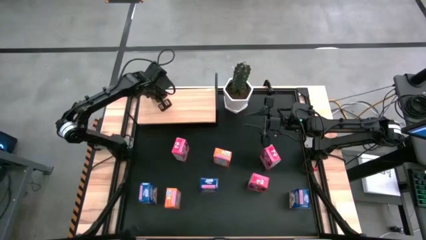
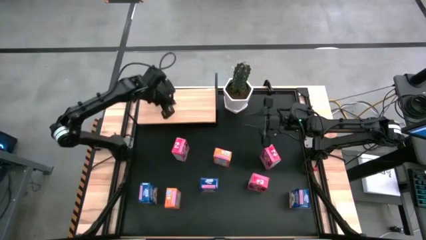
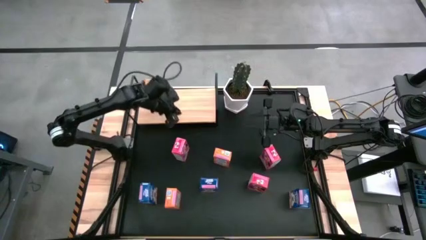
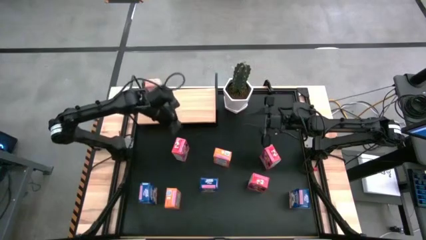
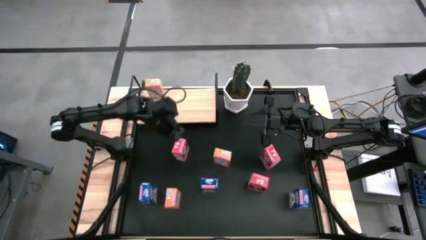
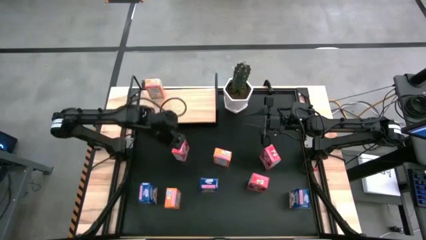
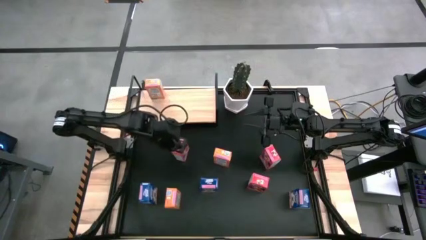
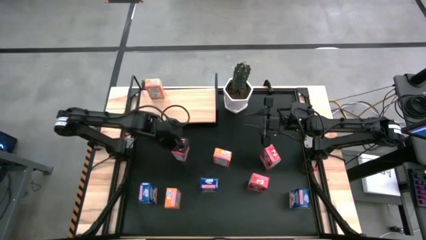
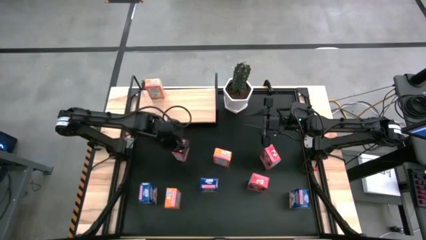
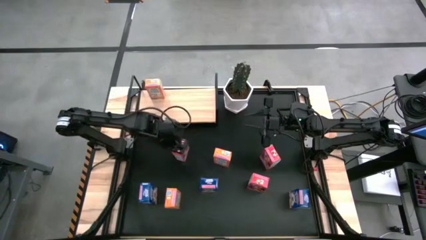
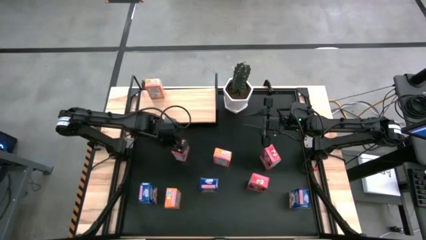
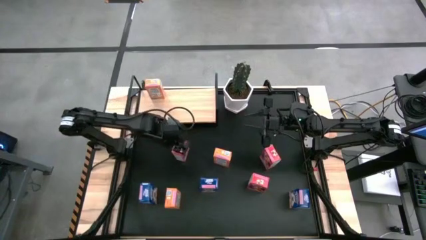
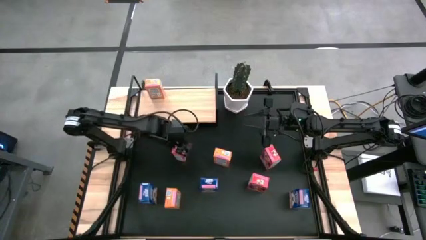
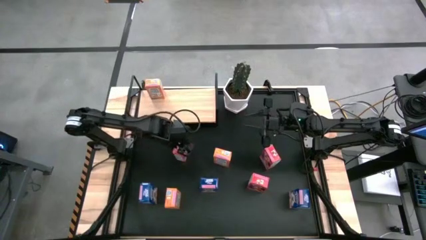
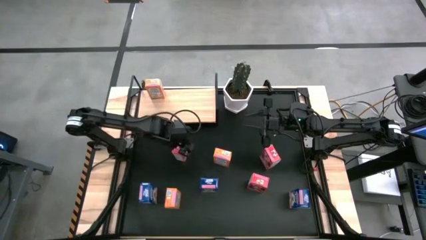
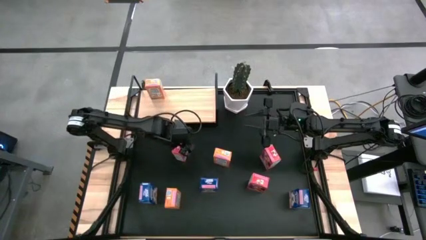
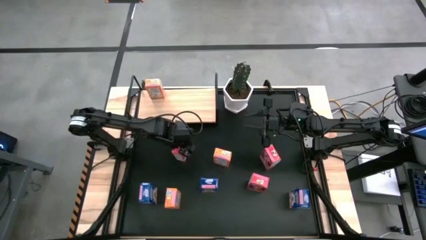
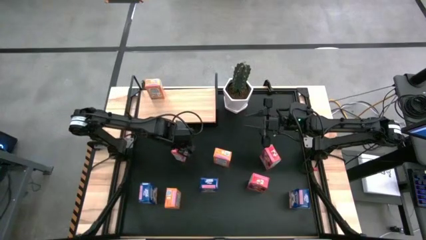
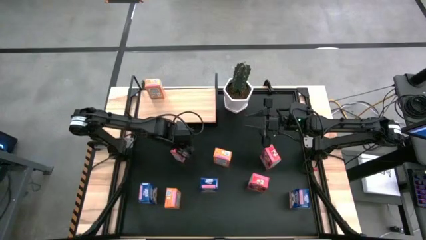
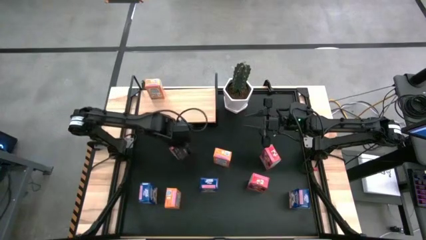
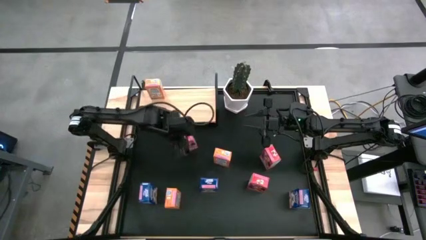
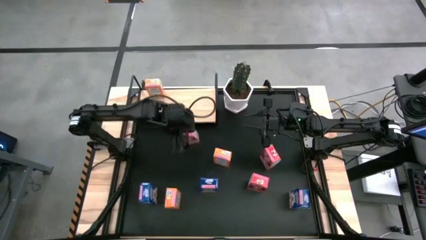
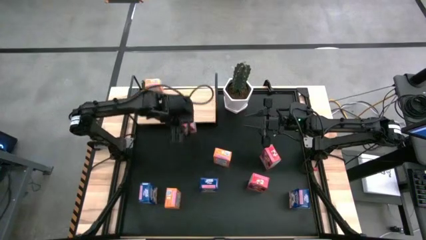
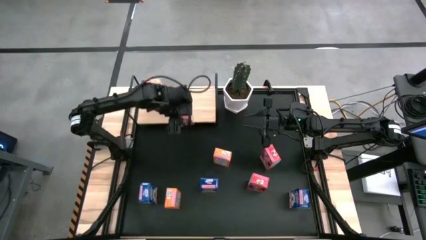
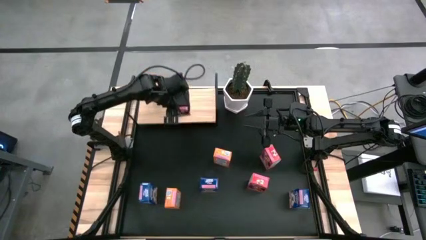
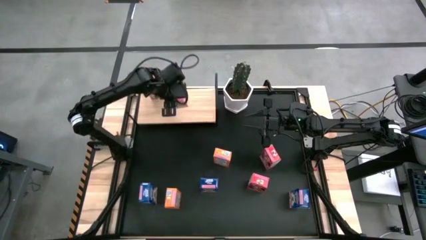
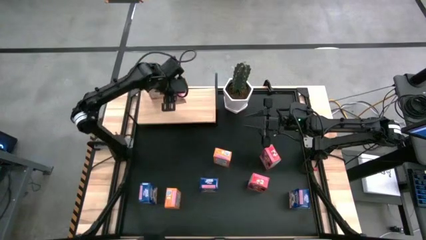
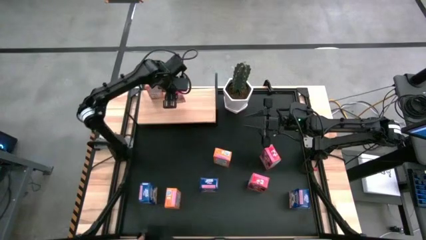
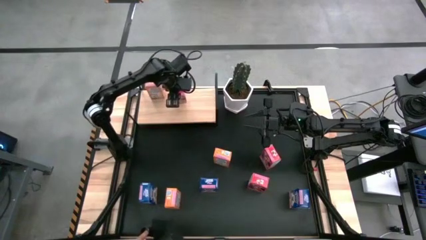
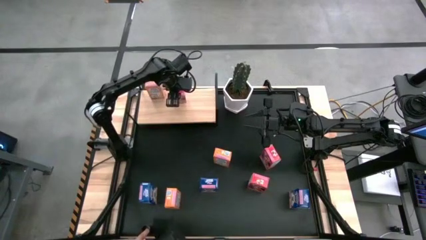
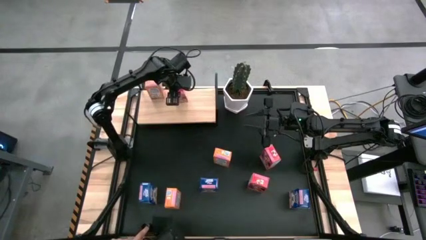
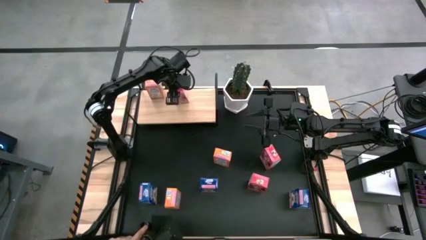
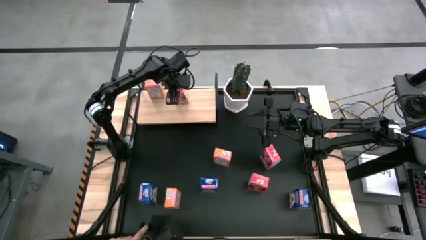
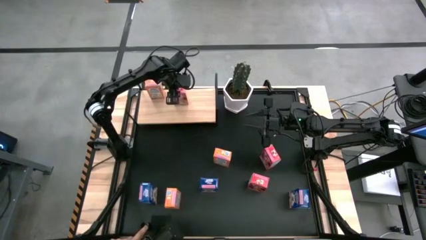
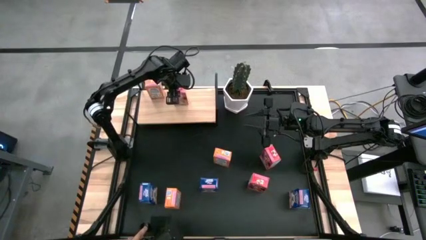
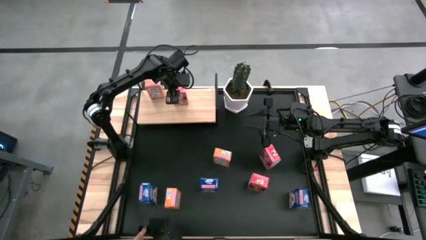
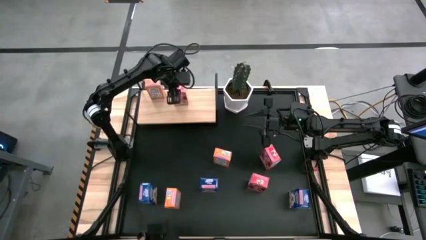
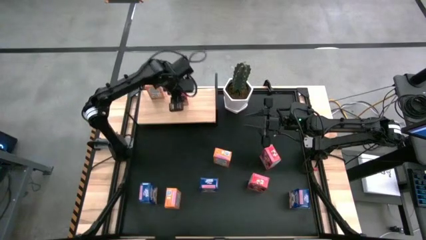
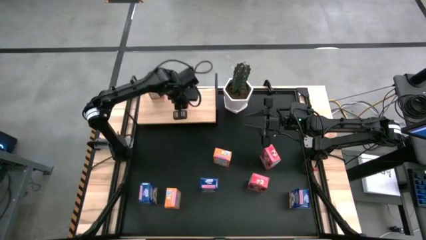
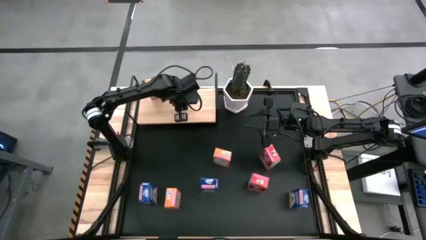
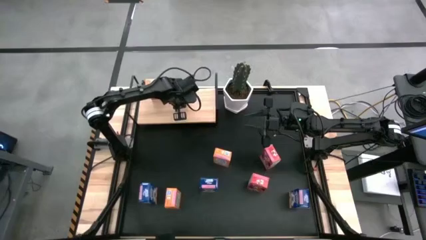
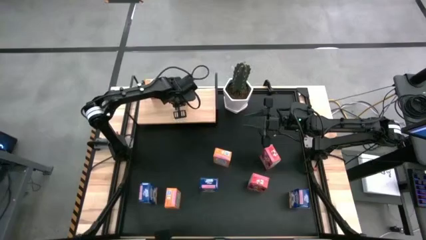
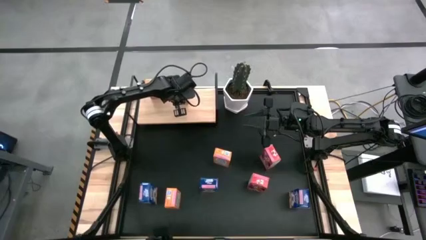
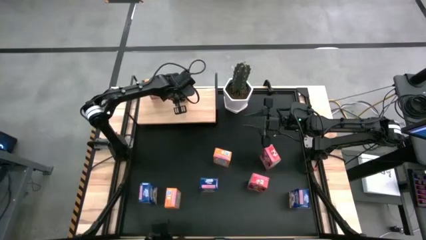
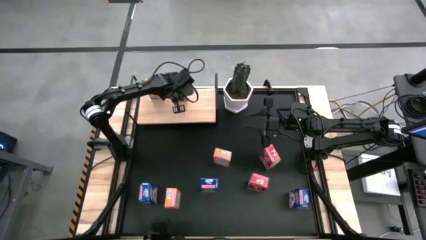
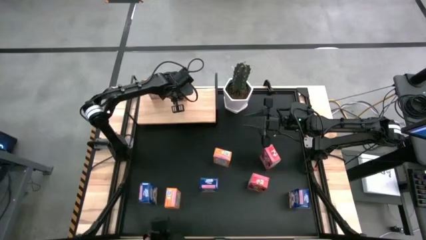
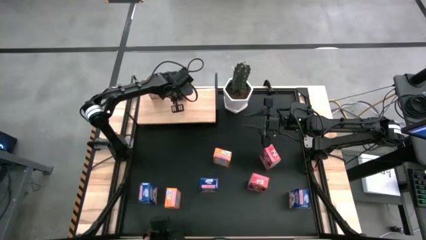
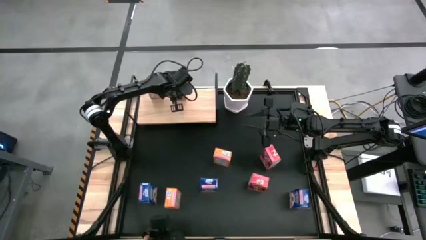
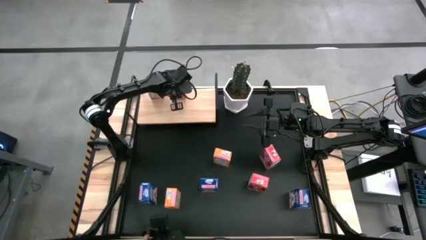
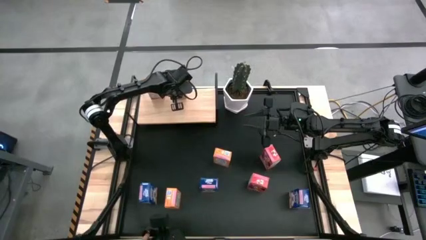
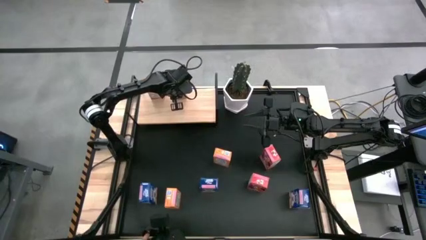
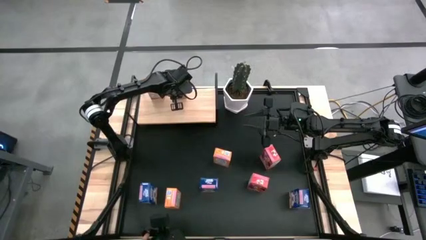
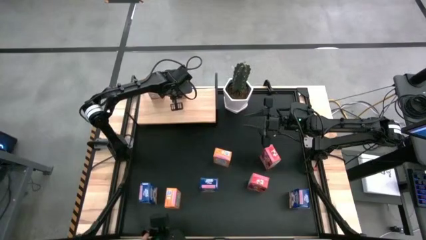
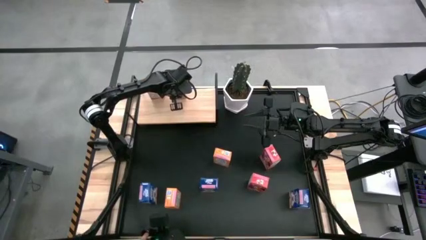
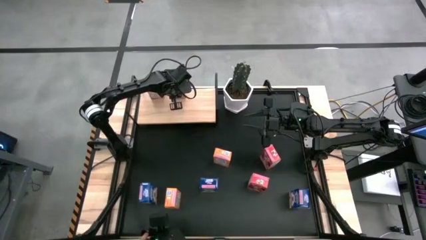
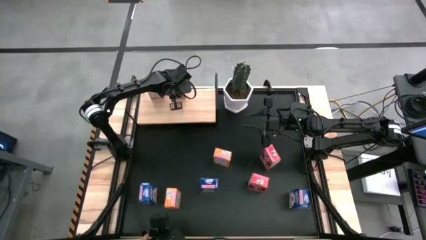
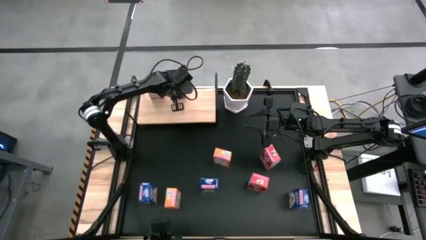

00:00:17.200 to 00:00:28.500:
Task: Stack cereal on shelf
Put the top left red cereal box on the shelf
